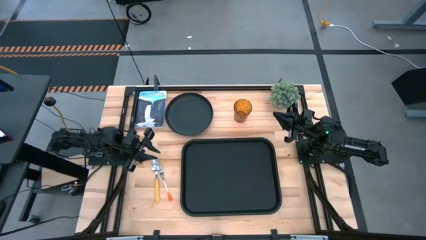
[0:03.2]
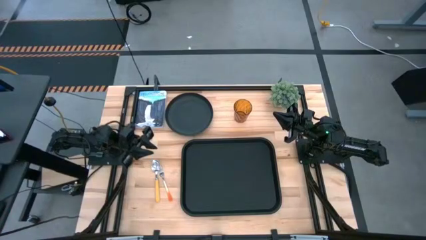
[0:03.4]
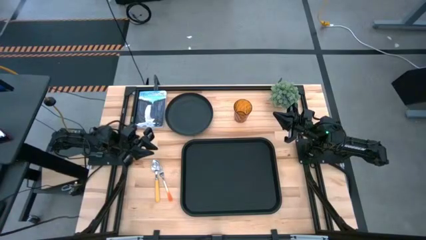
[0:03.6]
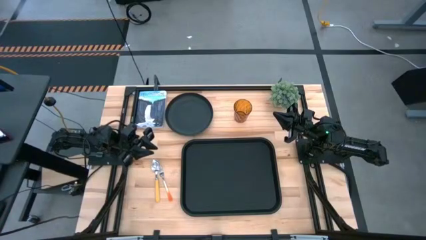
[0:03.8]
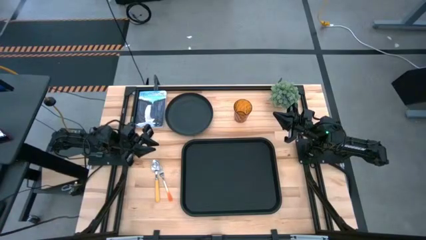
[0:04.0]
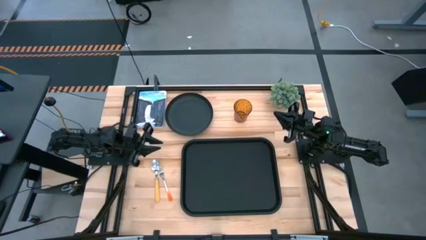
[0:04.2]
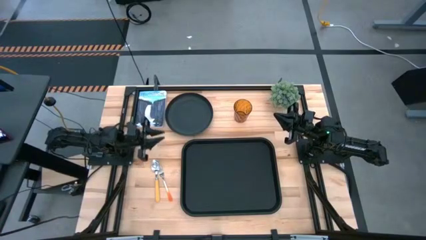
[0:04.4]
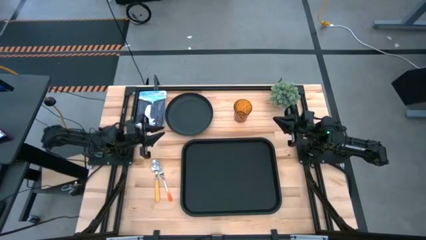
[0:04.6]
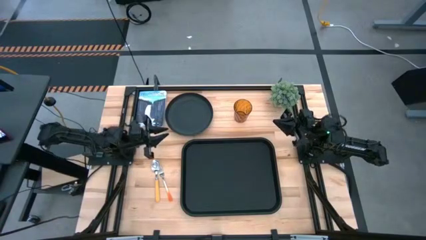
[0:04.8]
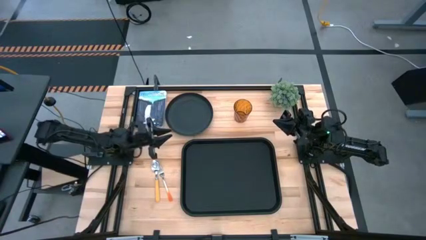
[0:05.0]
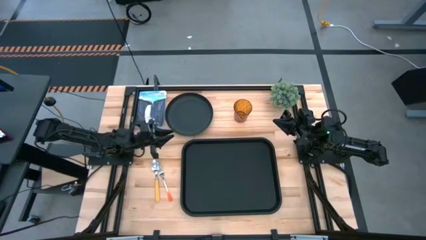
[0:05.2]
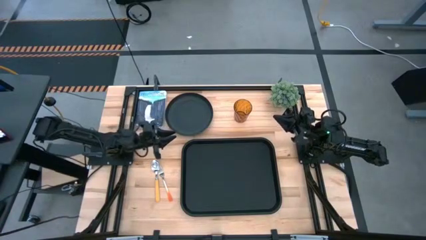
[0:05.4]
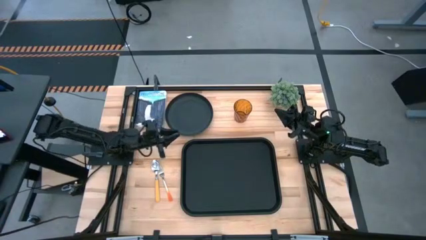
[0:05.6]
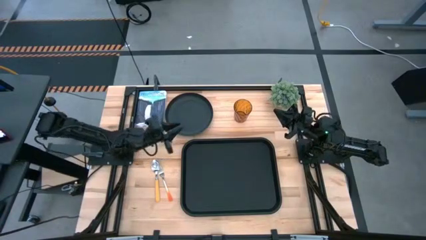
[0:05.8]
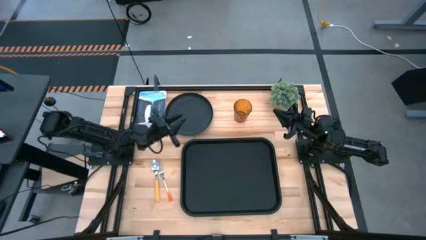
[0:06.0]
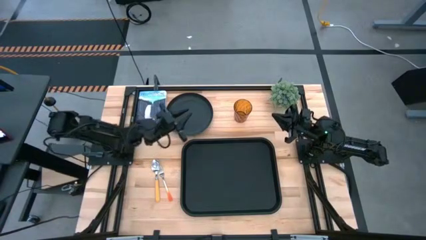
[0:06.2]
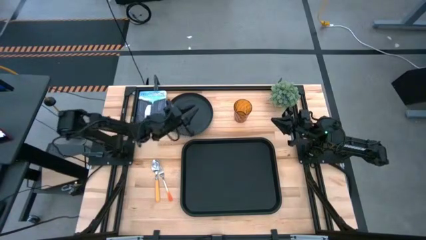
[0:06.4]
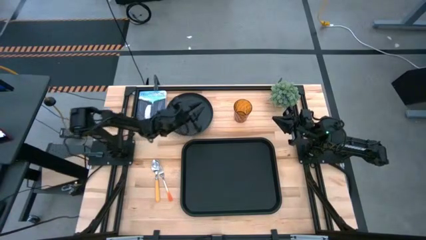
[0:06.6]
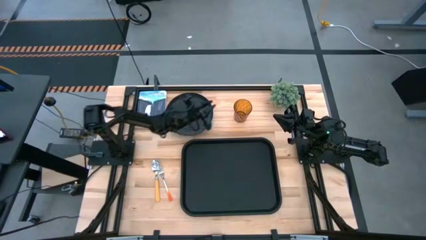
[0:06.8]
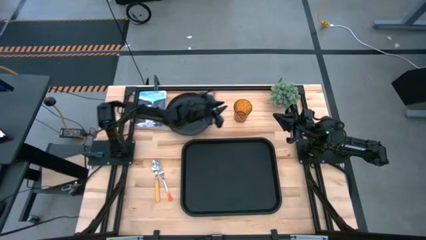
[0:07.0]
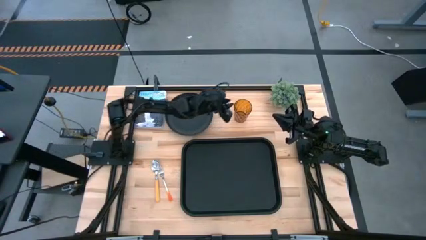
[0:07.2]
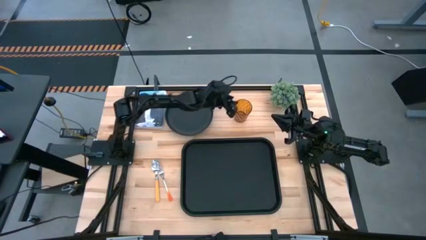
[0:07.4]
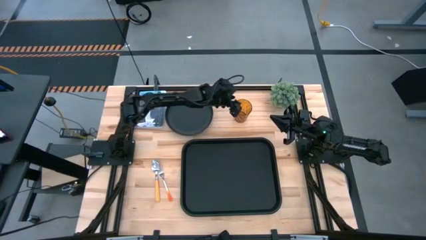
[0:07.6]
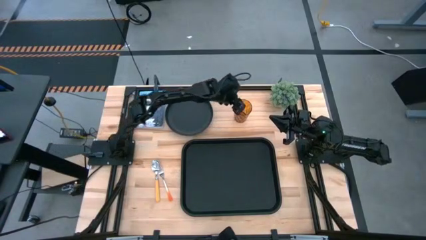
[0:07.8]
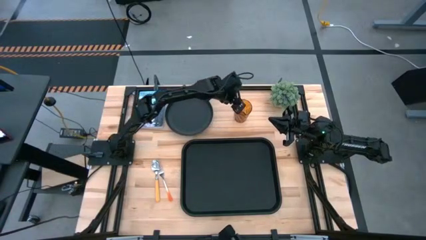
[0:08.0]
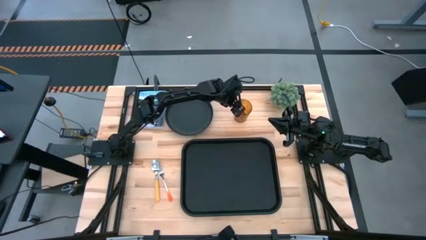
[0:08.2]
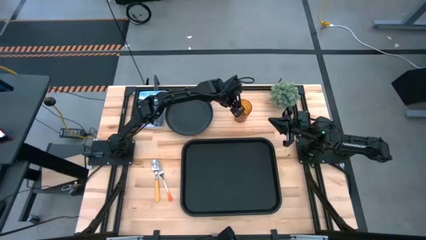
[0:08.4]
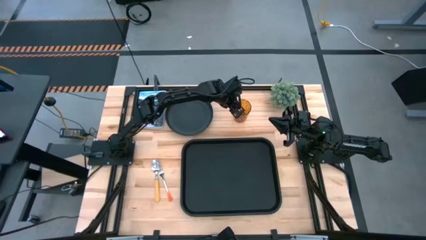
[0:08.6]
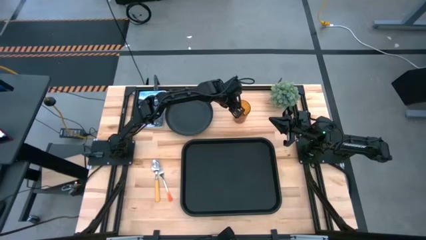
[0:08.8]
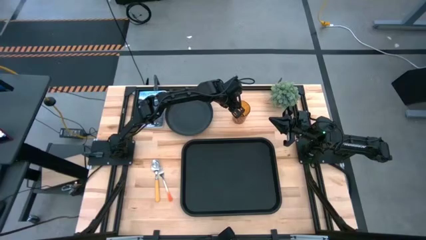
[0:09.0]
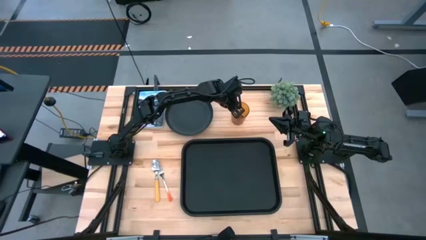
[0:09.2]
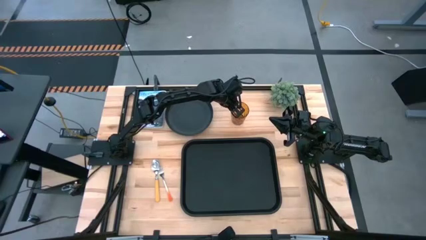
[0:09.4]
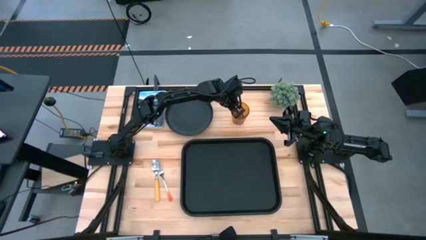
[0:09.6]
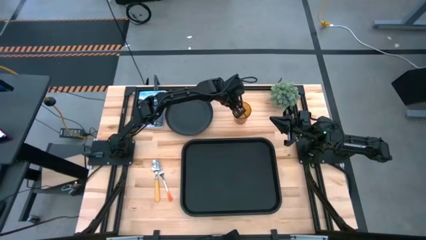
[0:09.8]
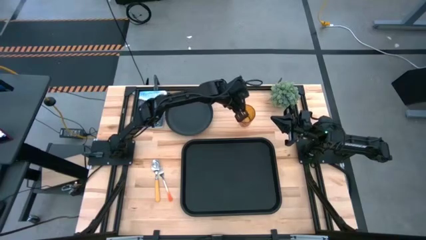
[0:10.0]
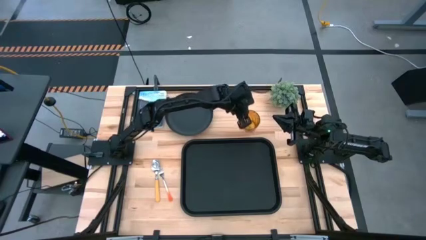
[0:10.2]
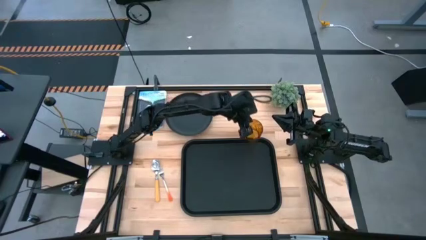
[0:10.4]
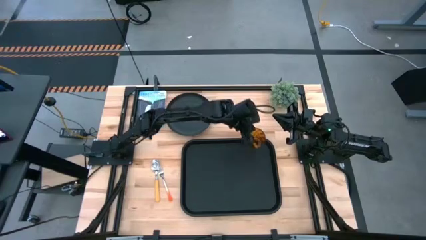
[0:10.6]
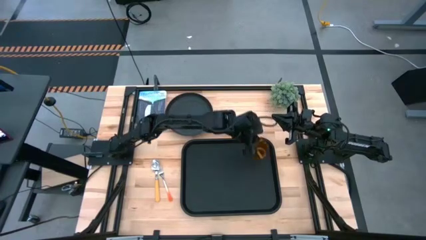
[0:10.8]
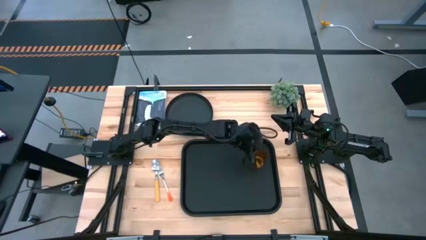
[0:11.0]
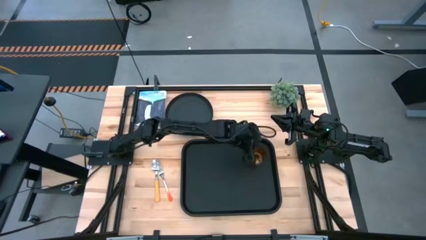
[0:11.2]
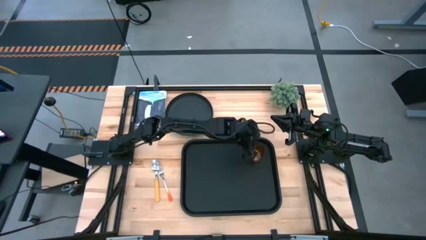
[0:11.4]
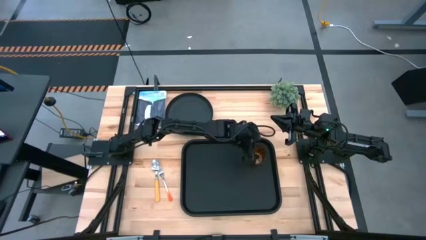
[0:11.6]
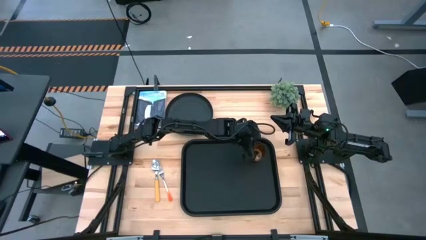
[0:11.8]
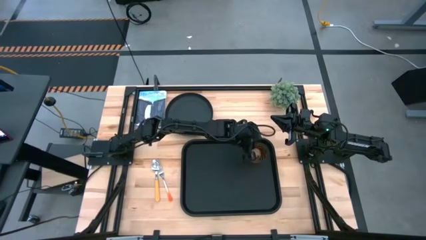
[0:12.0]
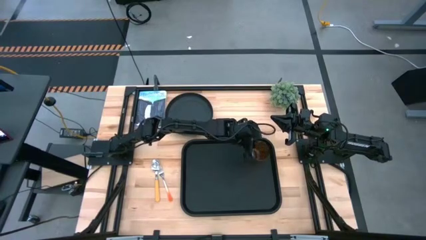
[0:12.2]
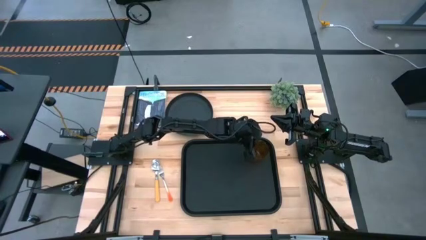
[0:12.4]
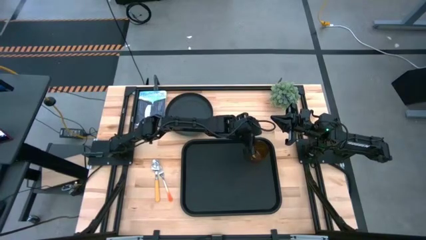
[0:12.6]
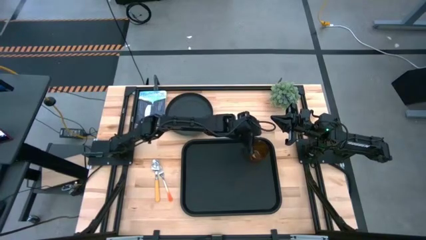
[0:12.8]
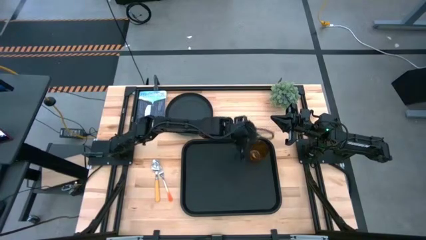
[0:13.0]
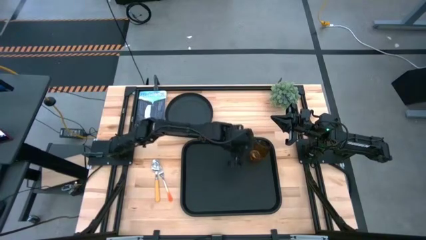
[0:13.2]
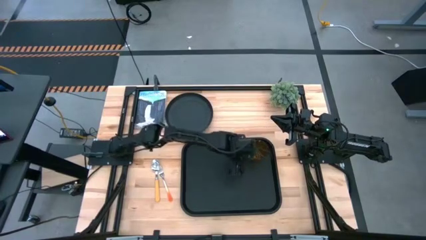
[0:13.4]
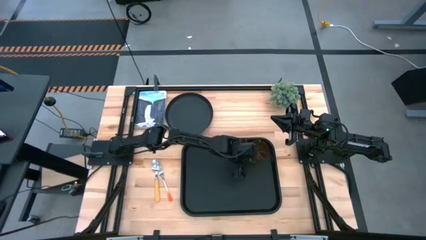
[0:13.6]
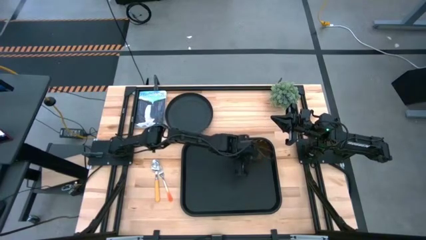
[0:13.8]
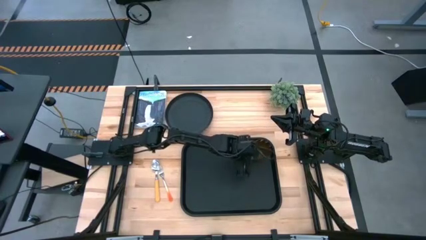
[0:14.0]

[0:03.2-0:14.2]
Task: Pick and place plate/cup/fork/spoon on tray
Put the glass cup on the serving tray
